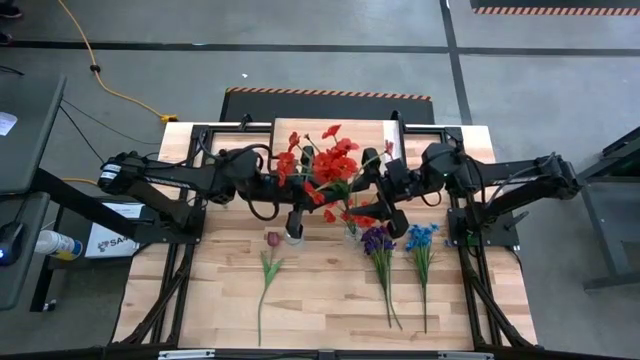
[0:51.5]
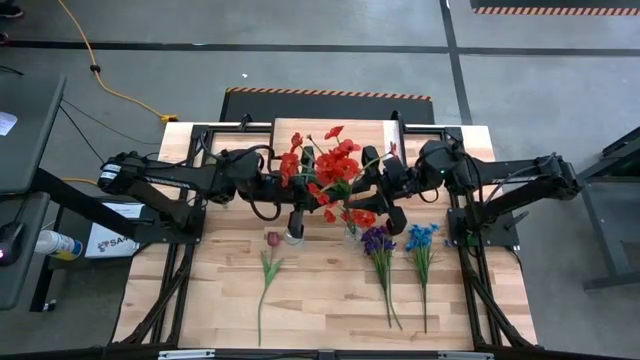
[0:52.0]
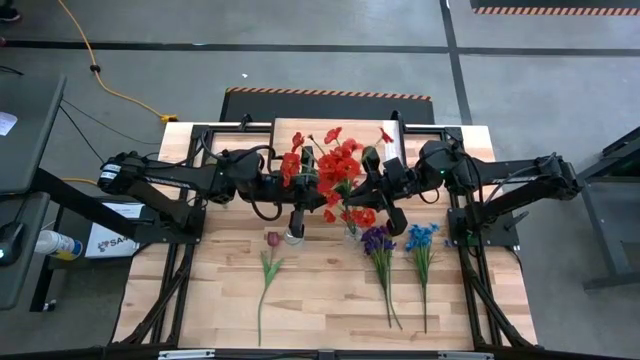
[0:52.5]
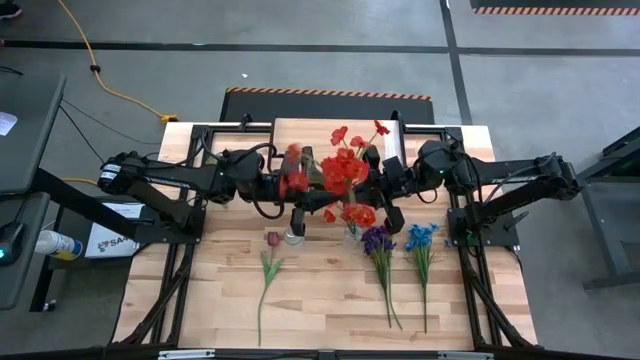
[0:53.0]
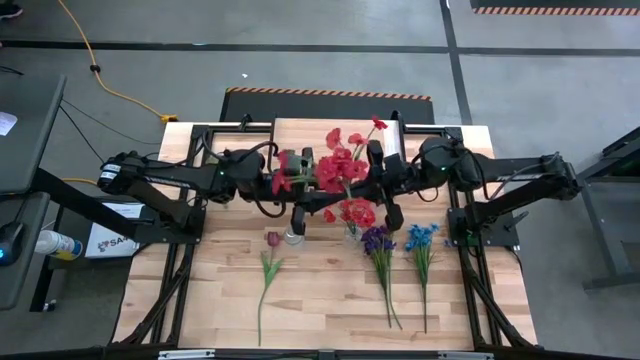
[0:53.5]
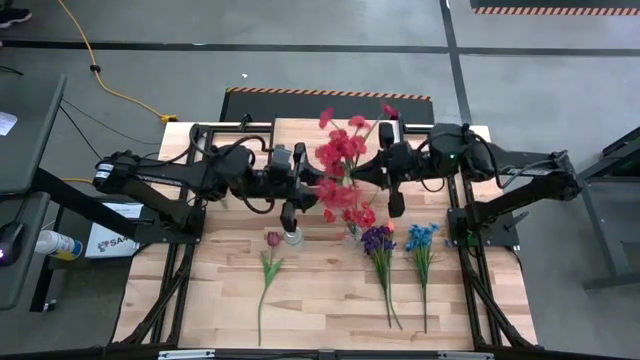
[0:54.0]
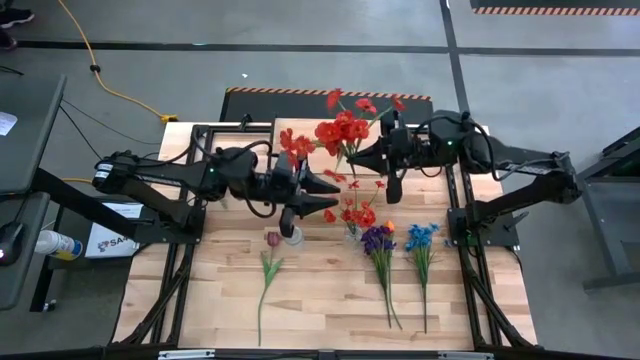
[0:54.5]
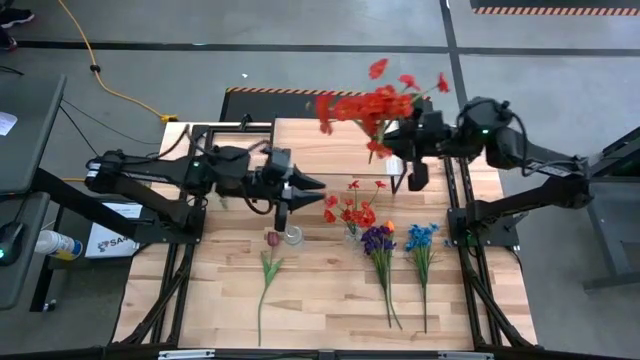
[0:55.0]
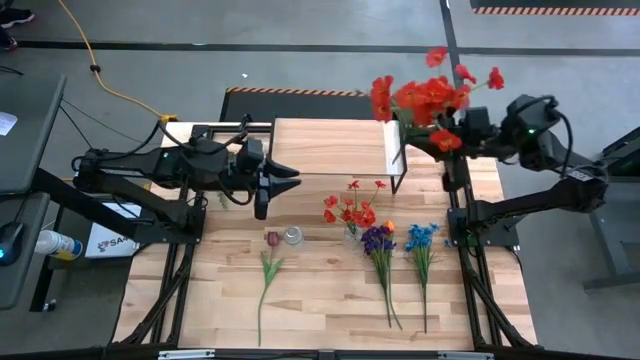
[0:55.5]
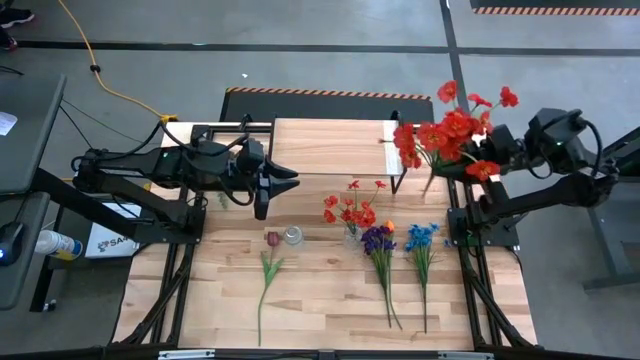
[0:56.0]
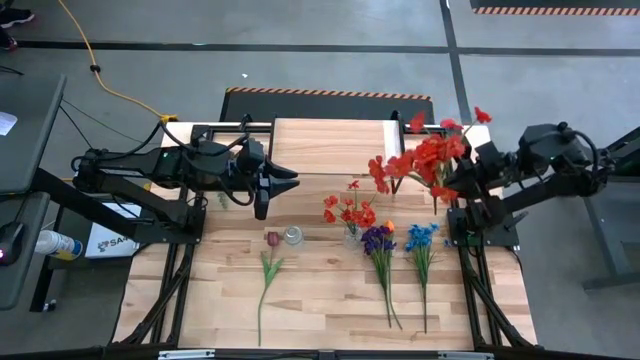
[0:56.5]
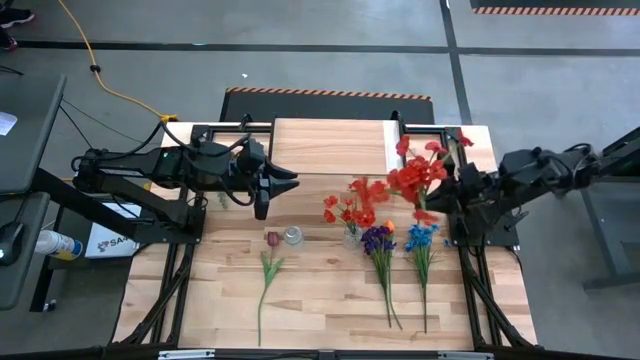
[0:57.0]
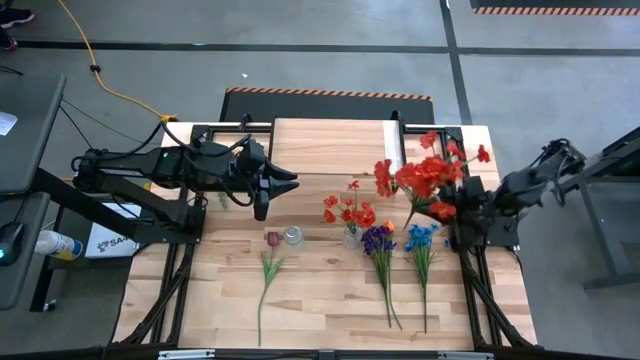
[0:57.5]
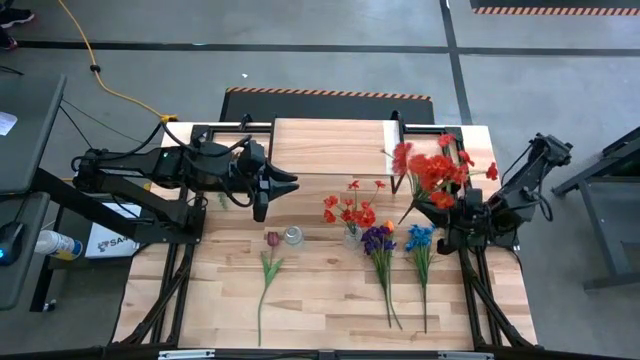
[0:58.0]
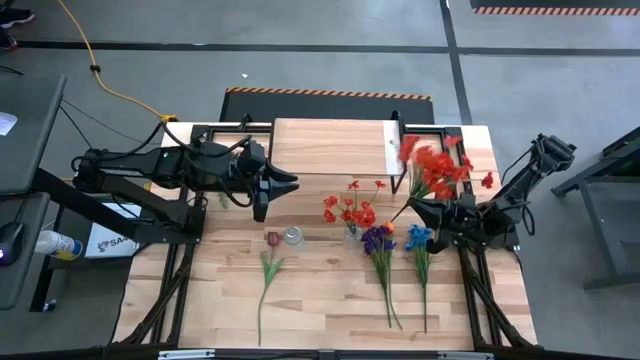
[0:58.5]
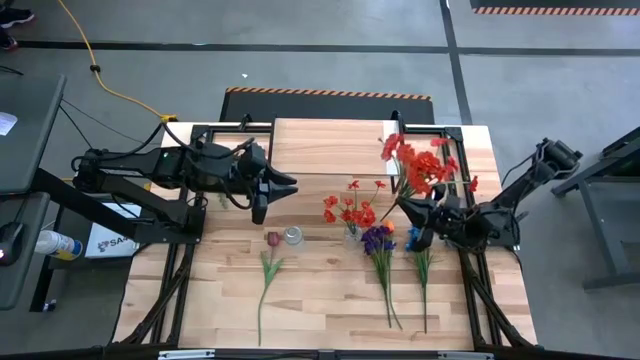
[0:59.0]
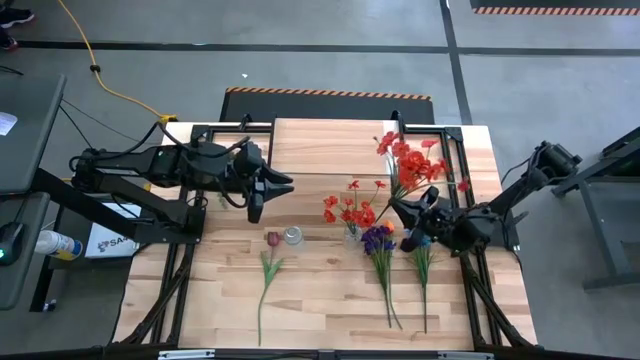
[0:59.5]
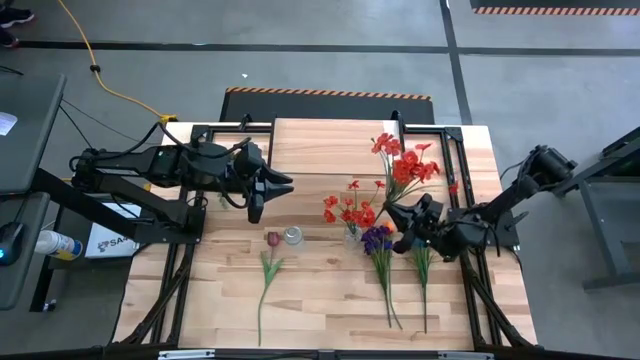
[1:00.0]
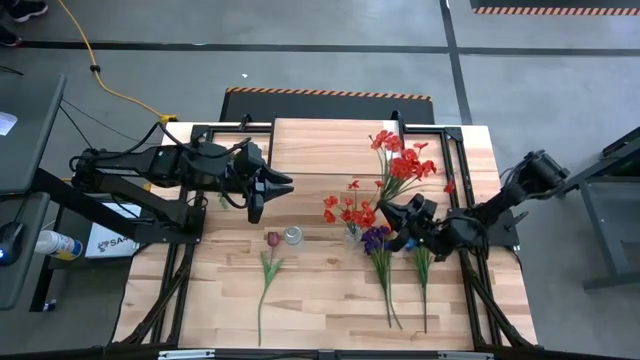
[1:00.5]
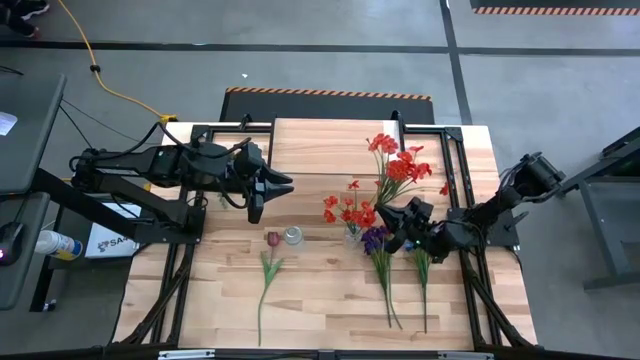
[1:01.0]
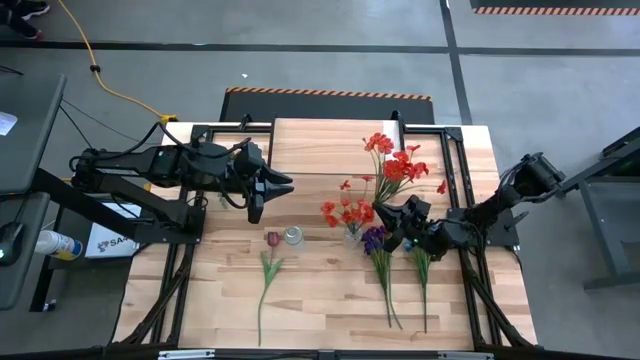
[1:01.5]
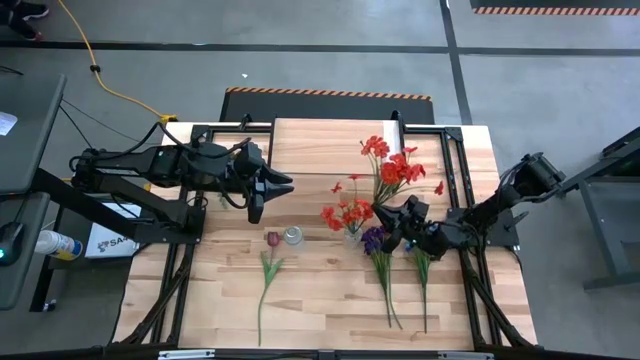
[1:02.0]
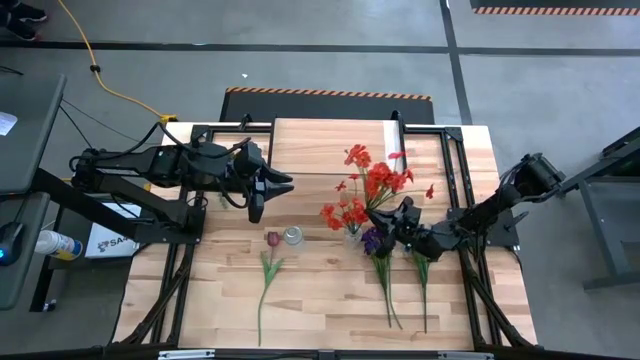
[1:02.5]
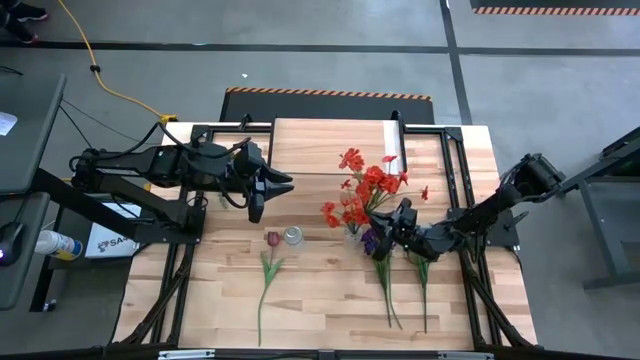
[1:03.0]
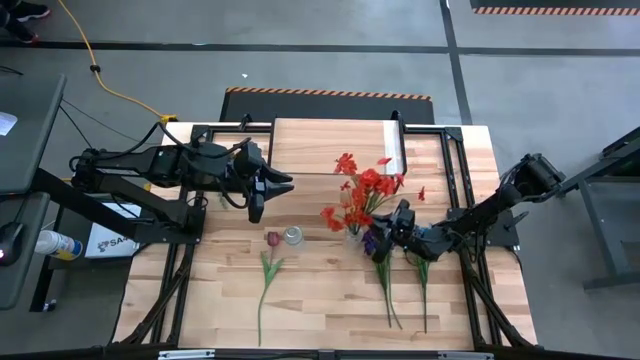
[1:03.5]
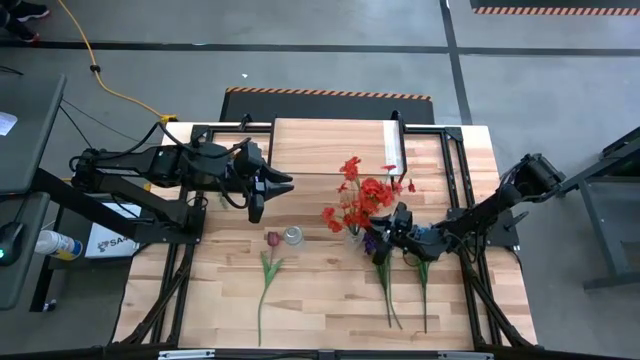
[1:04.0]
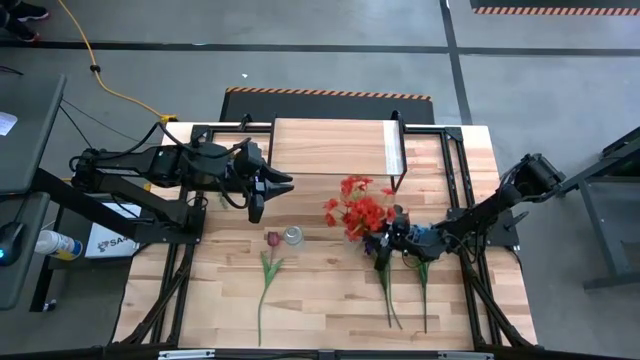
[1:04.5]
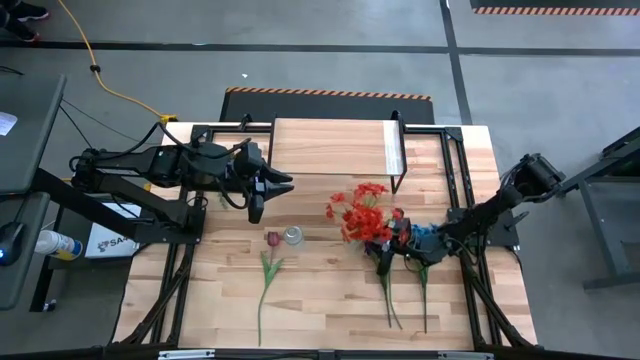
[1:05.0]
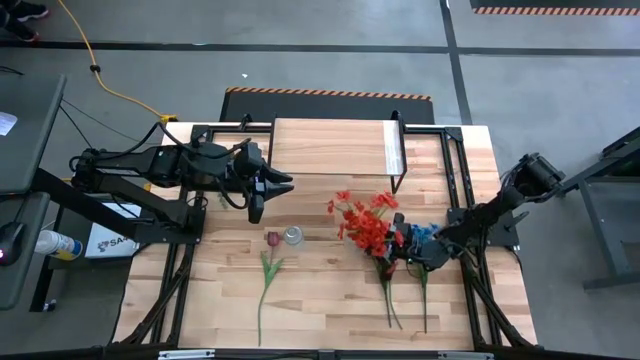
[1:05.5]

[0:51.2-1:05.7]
Task: Pick and place flowers into a vace then onto a shelf
Put the orange flowers into the right transparent vase

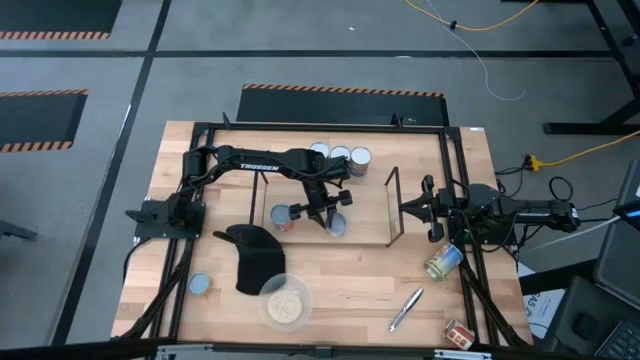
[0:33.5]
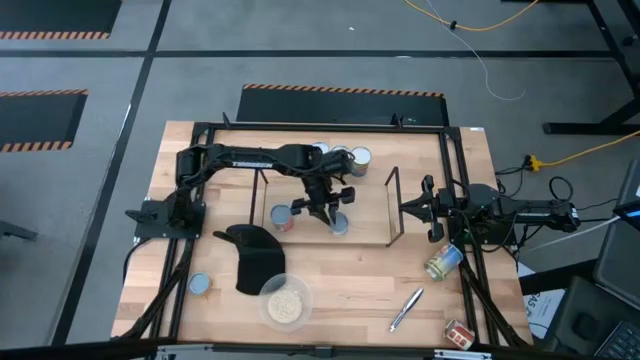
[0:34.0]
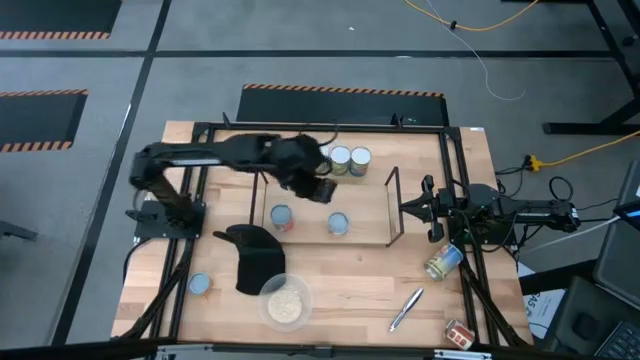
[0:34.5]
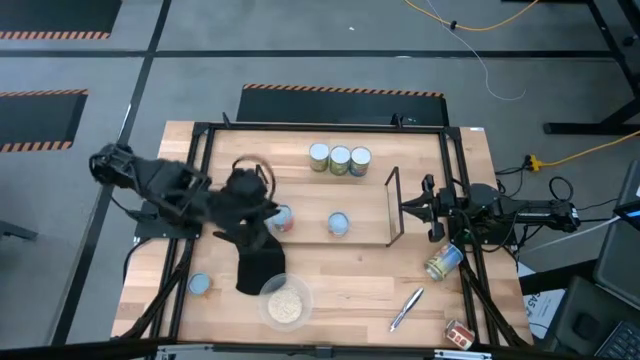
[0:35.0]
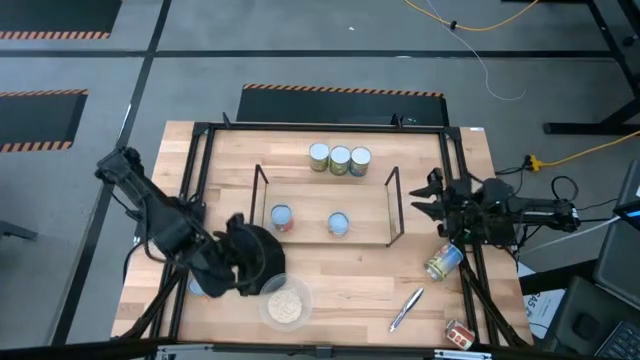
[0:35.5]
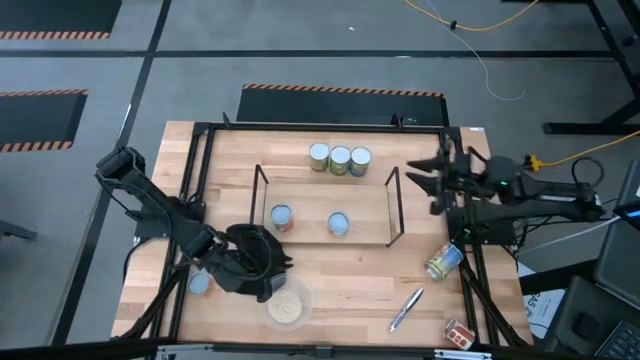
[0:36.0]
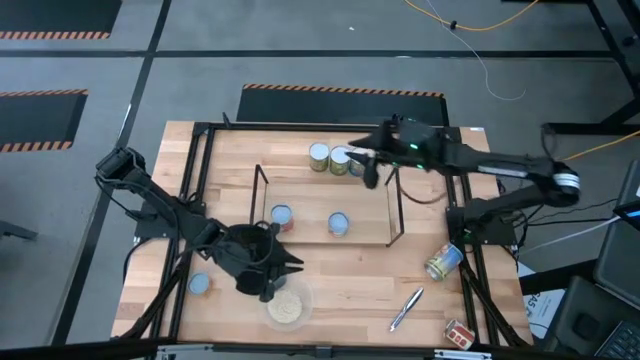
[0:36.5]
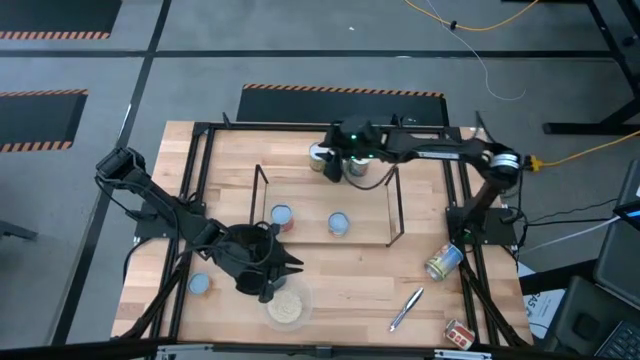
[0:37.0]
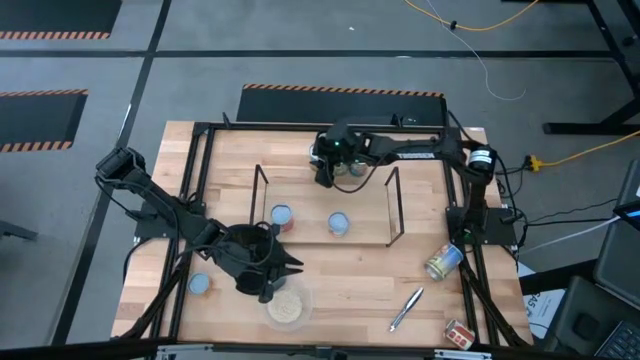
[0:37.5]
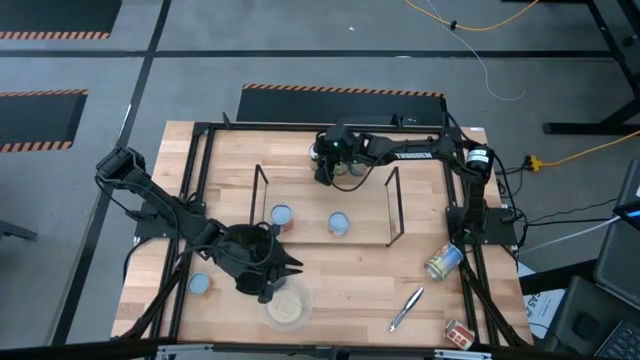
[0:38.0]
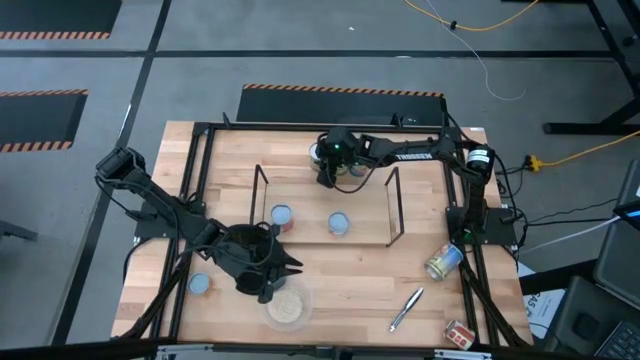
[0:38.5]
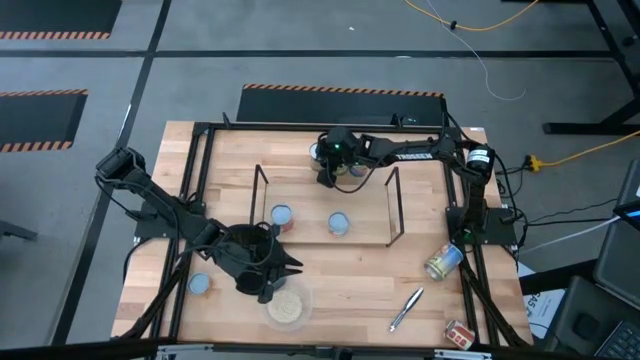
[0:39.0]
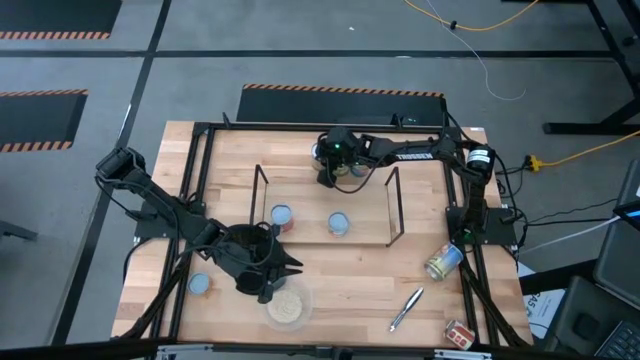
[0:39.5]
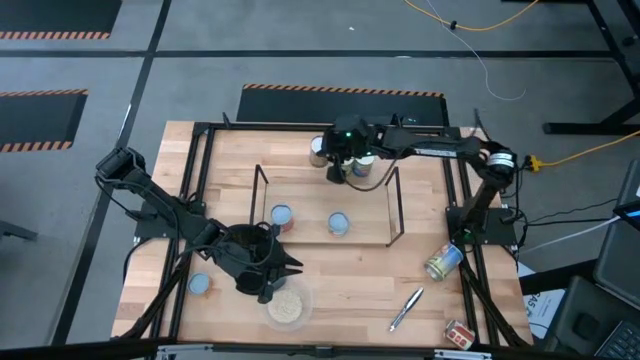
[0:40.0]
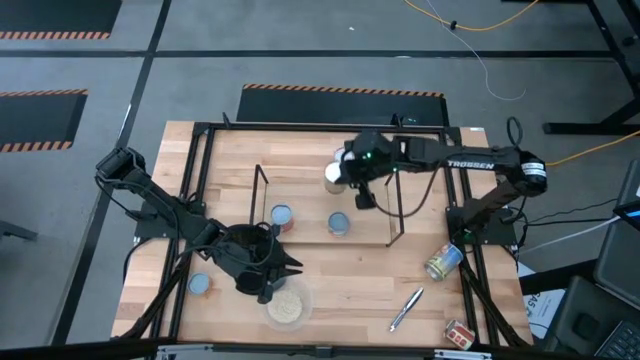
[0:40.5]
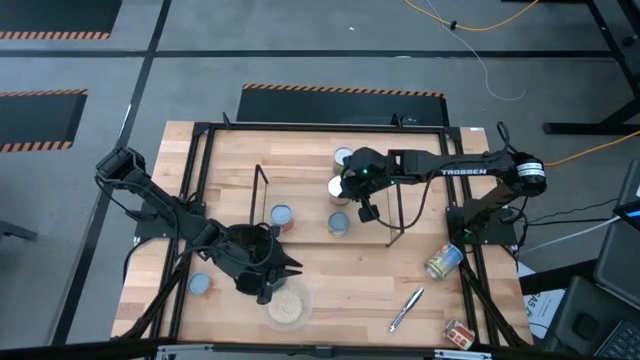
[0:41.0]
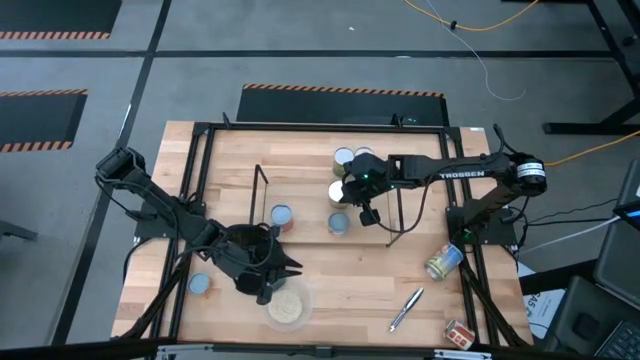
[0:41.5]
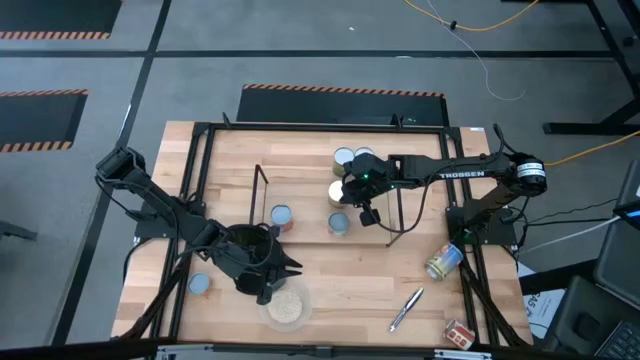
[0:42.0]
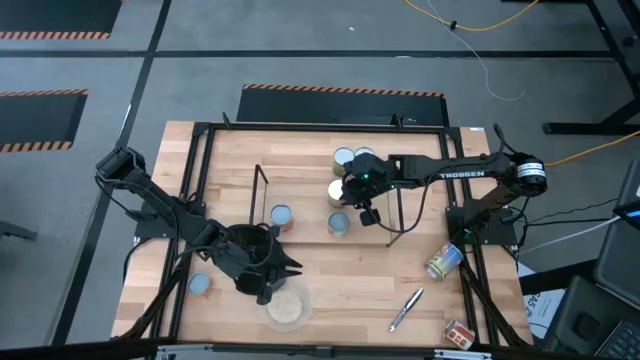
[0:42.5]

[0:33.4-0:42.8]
Task: Pick and place cans onto a shelf
Put the large canned oranges on the shelf
